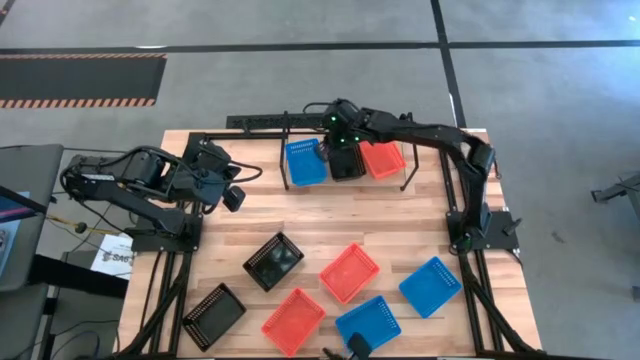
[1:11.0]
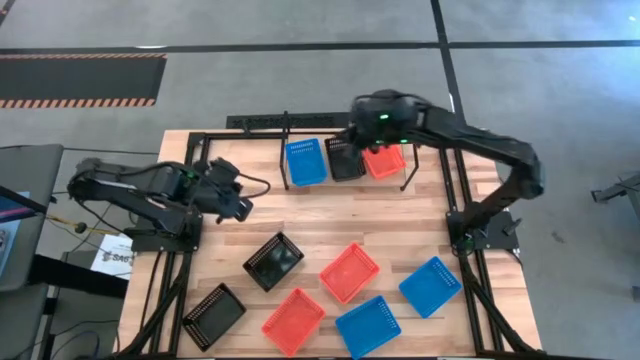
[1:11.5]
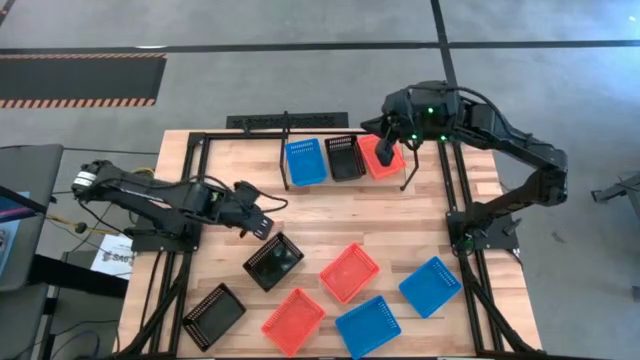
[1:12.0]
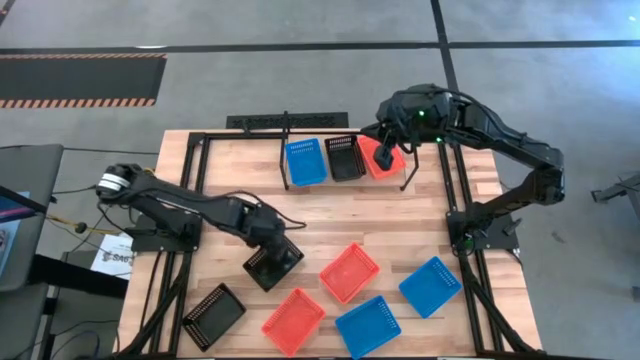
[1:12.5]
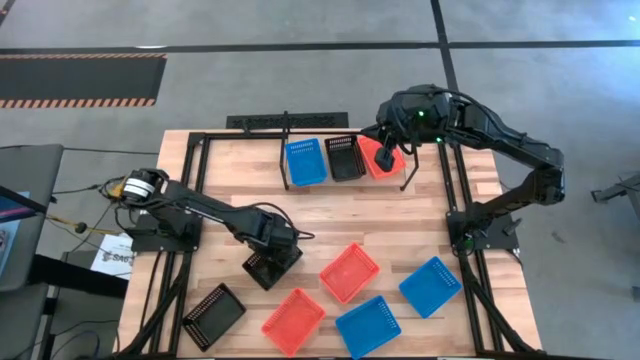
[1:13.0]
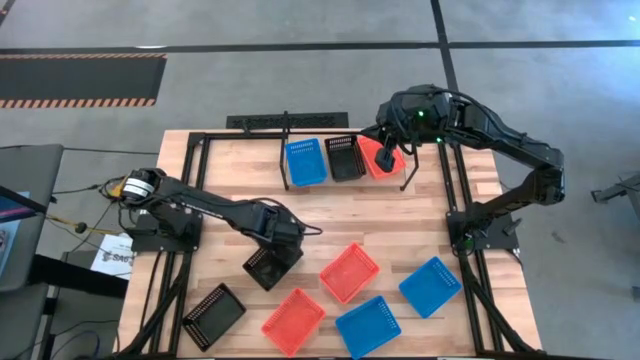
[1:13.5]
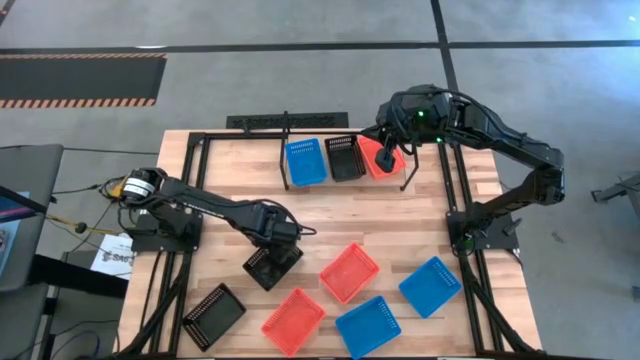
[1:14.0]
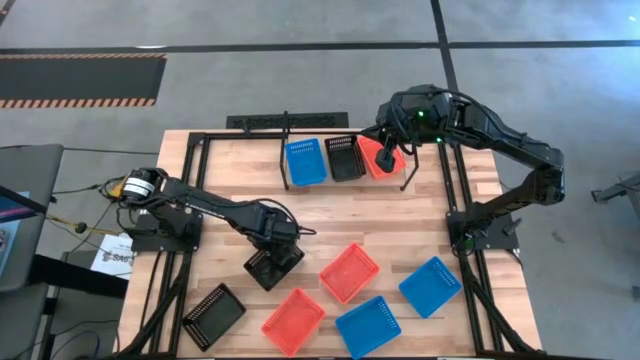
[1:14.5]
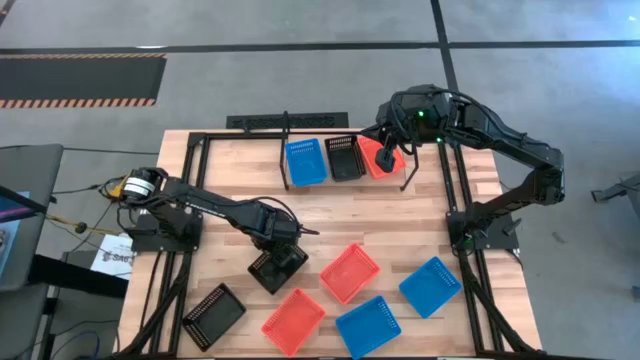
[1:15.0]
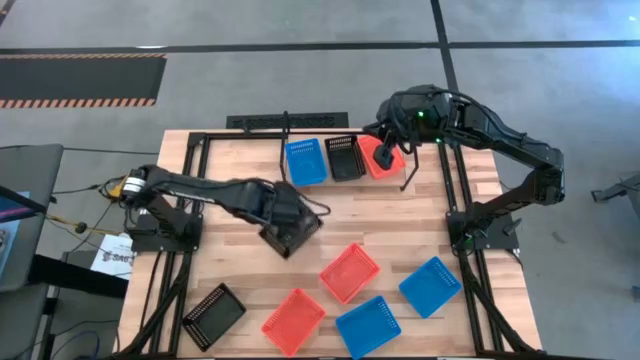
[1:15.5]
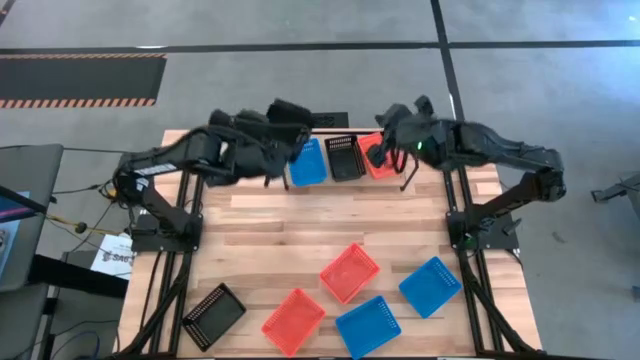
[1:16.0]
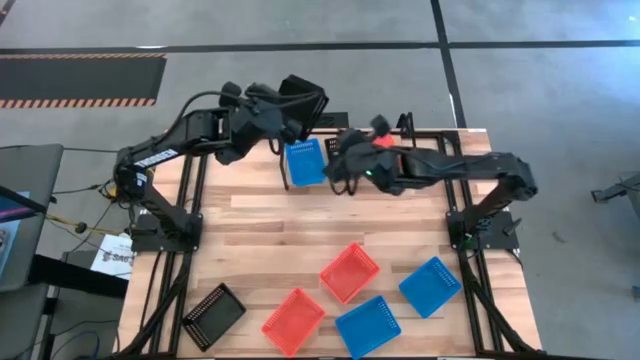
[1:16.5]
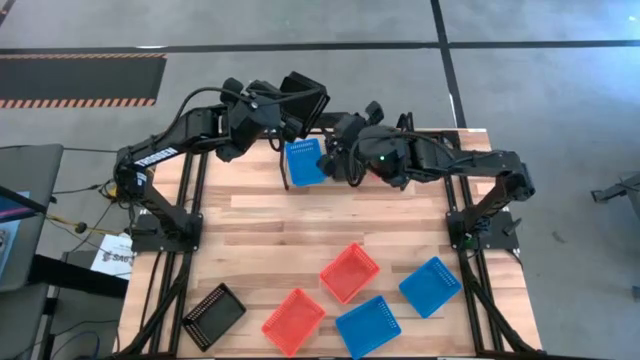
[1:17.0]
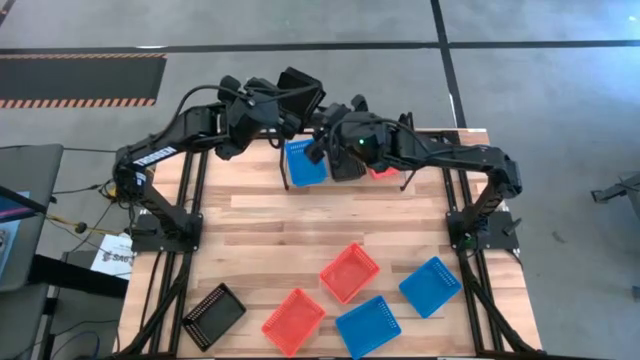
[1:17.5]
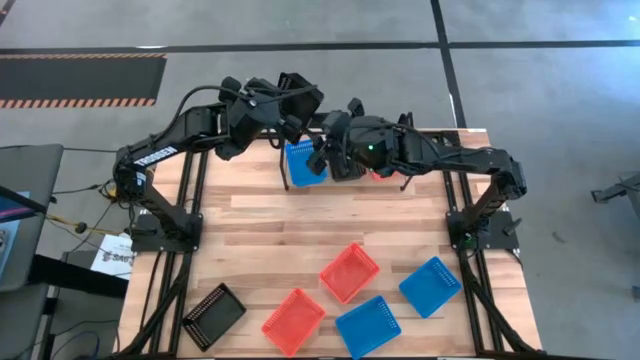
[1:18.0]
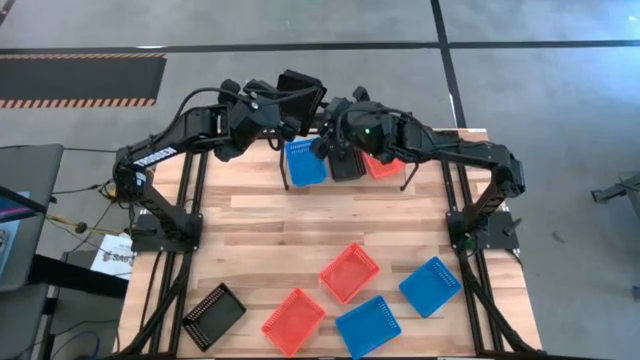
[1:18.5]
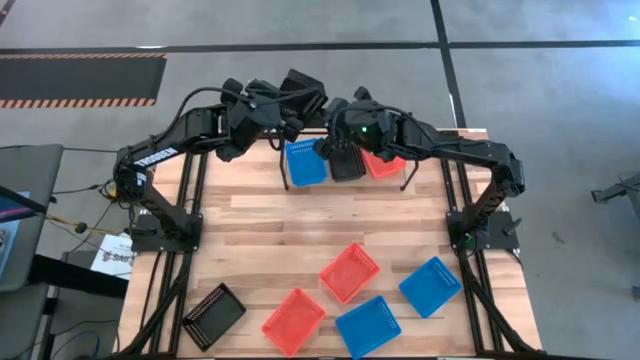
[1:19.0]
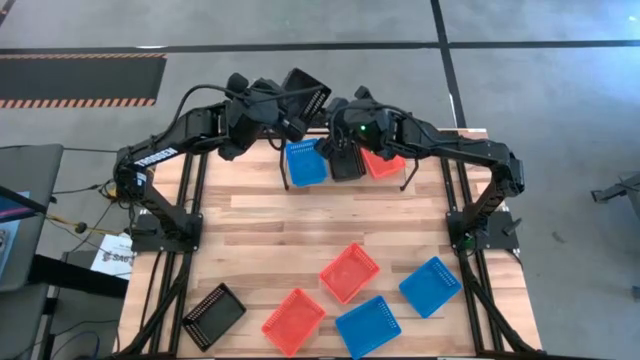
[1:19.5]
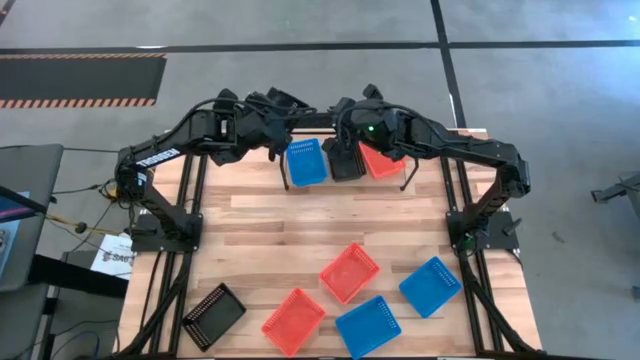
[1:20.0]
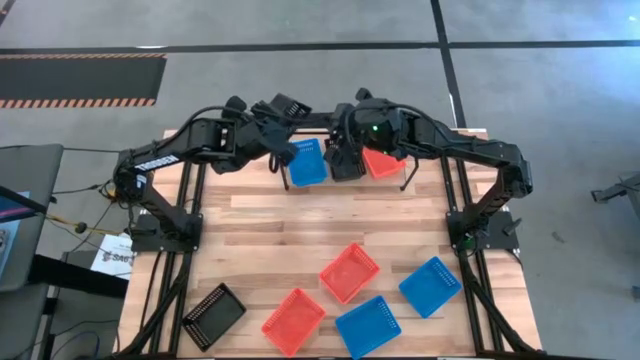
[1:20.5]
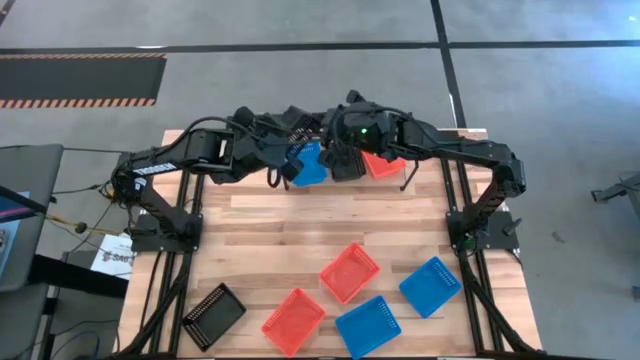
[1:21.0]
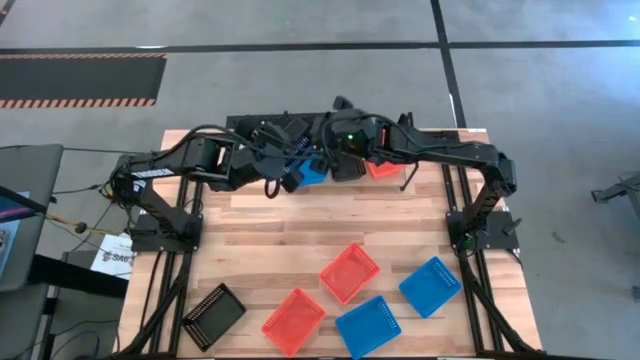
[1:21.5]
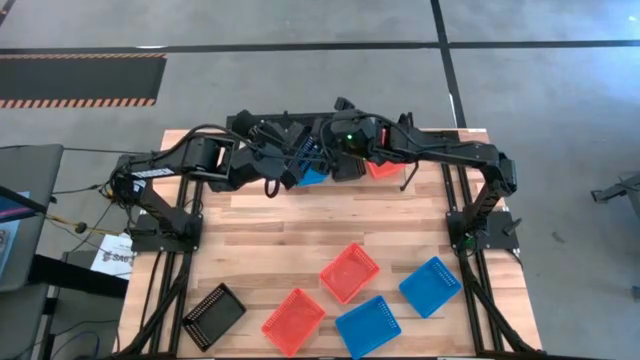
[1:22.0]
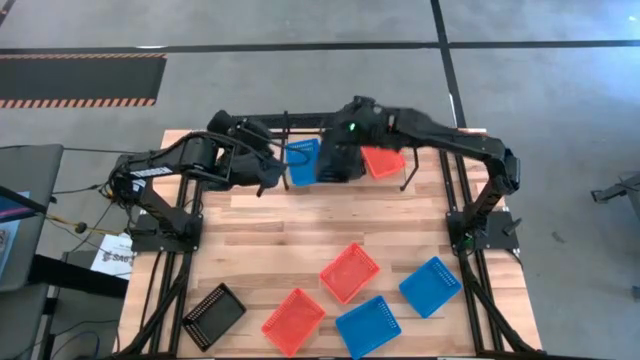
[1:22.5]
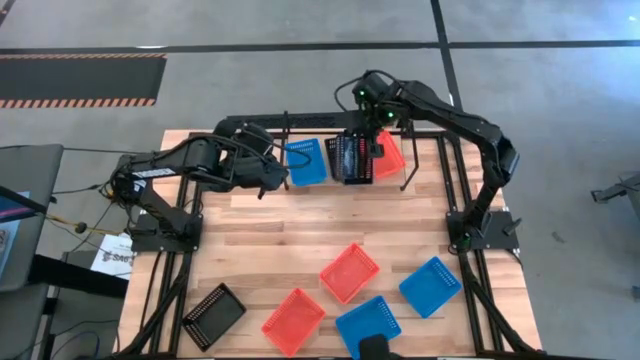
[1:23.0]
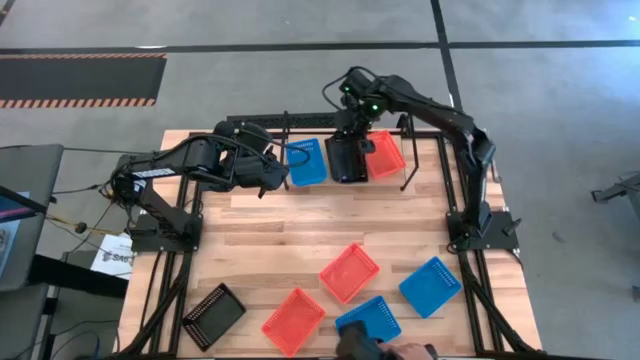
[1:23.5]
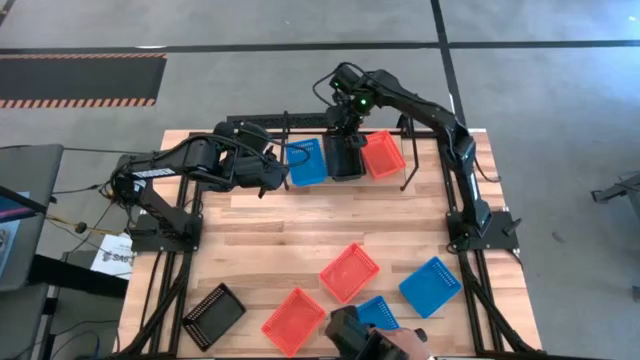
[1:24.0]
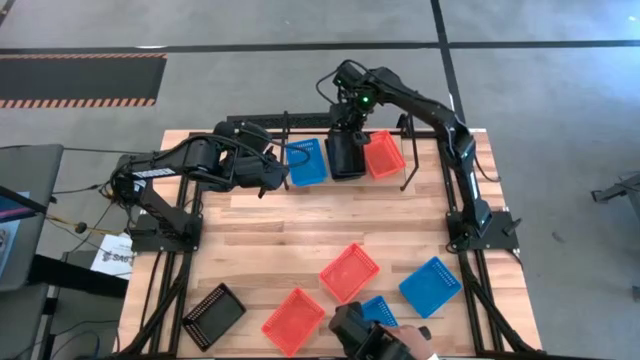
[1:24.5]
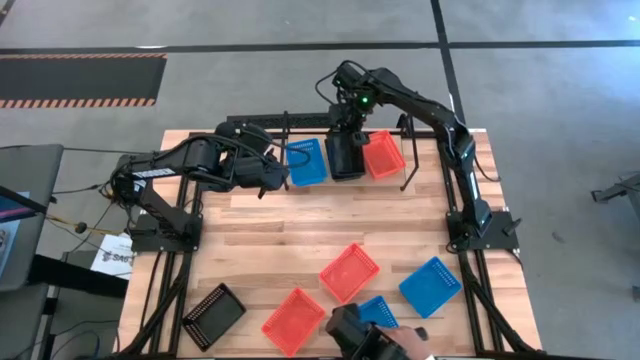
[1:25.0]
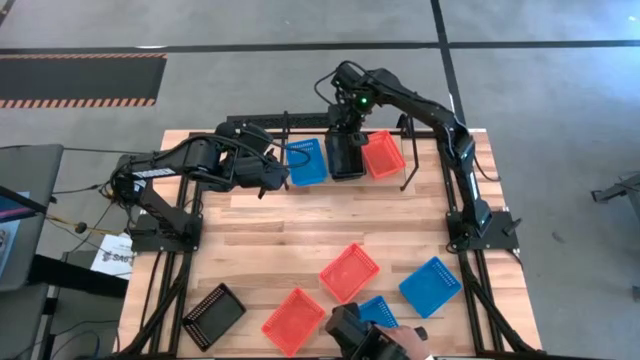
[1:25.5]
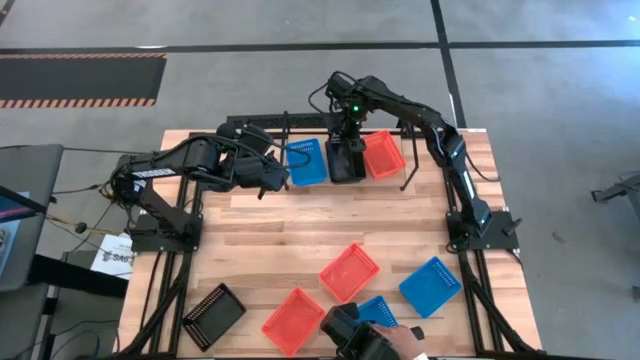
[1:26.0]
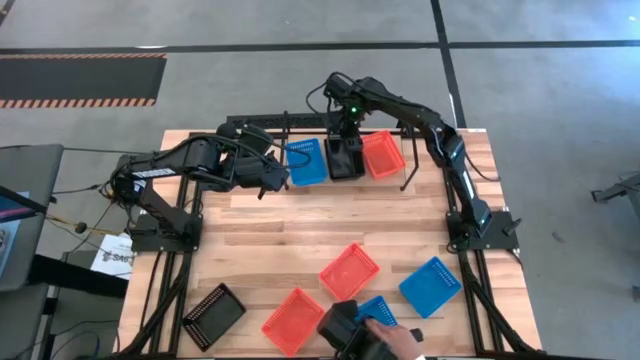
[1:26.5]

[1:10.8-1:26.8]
Task: Stack baskets on shelf by color
Stack the top black bin on top of the black bin on the shelf

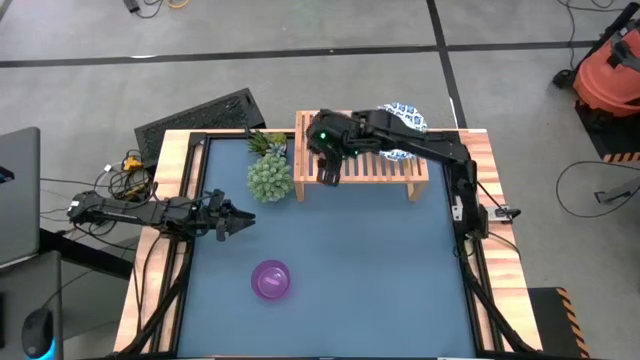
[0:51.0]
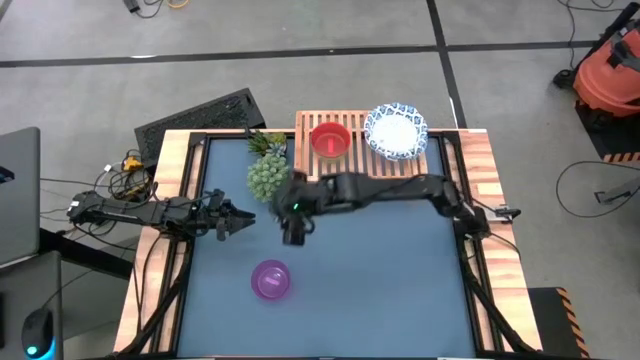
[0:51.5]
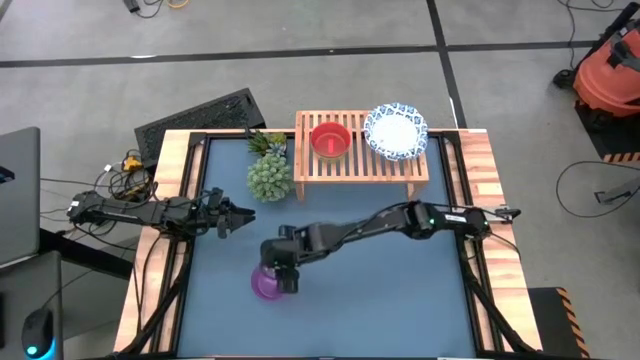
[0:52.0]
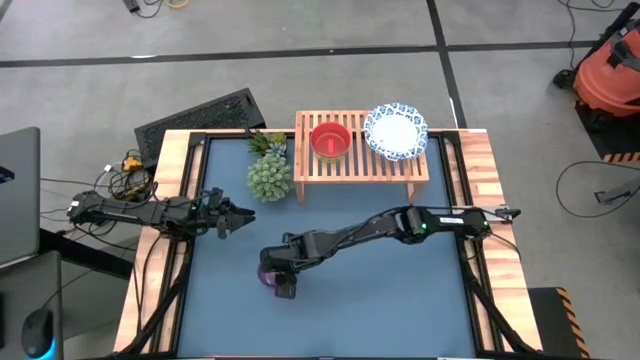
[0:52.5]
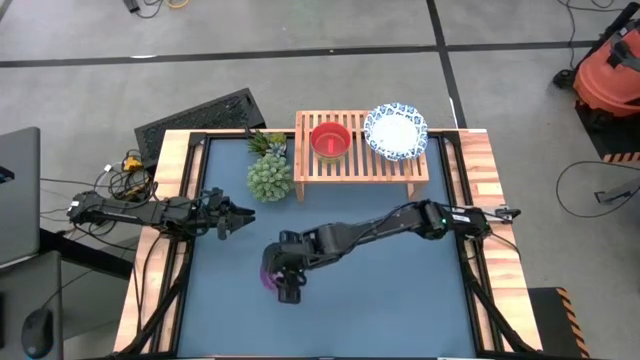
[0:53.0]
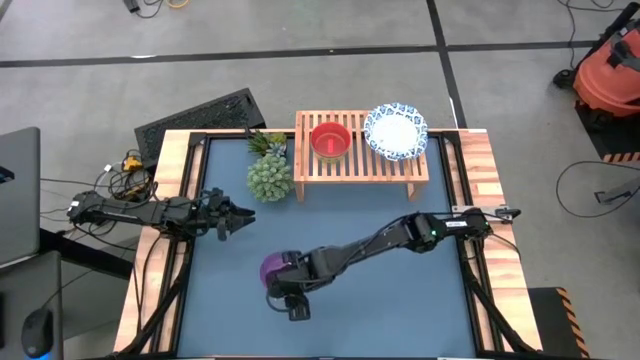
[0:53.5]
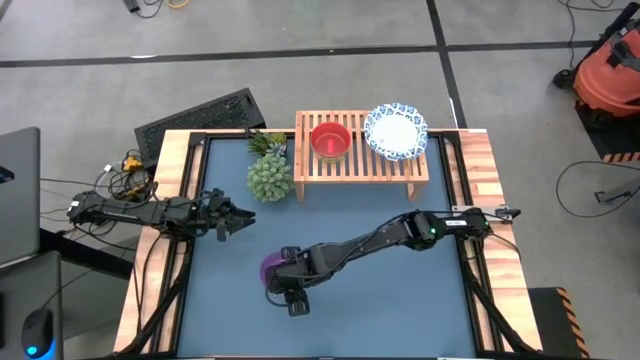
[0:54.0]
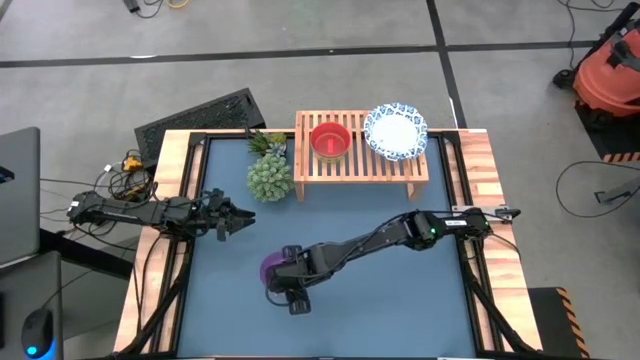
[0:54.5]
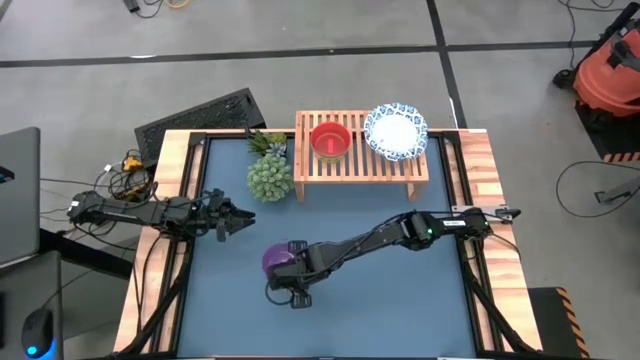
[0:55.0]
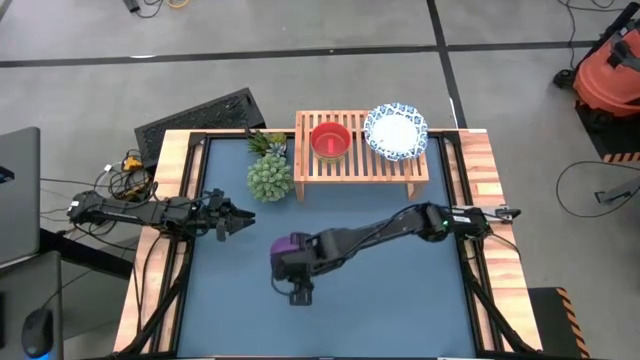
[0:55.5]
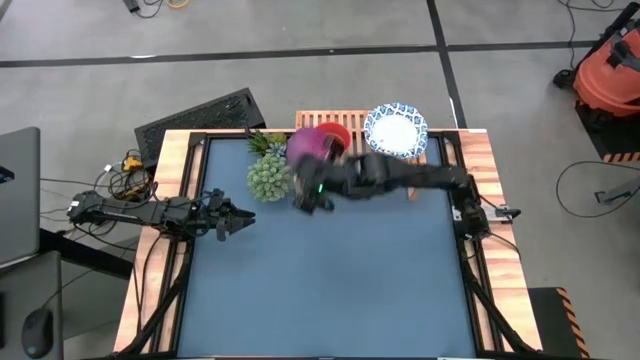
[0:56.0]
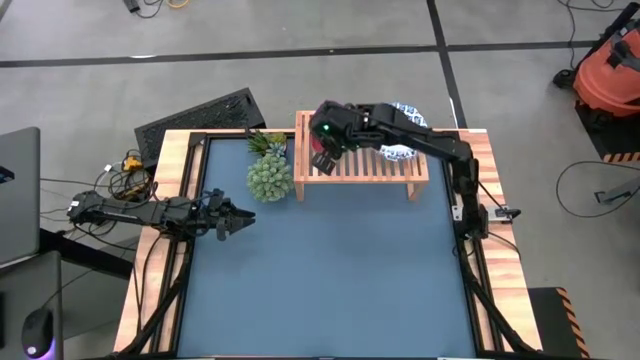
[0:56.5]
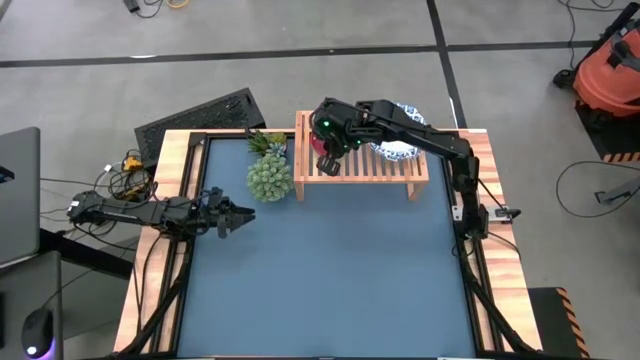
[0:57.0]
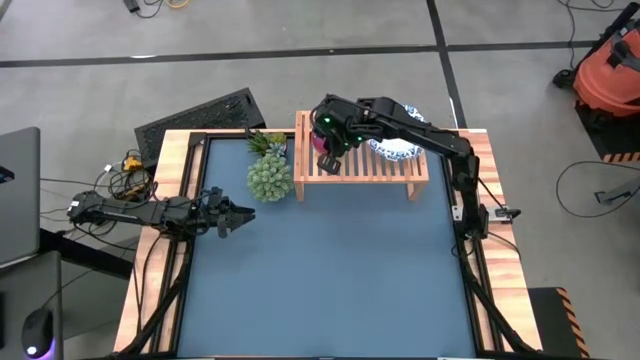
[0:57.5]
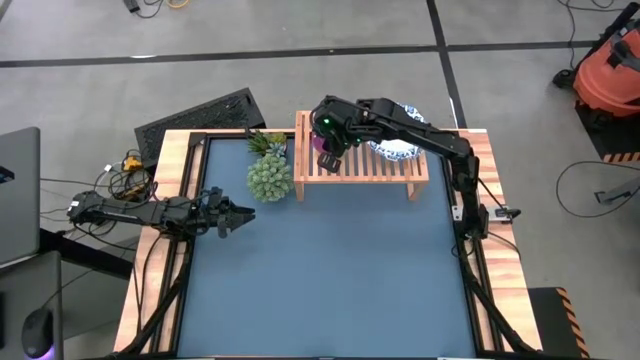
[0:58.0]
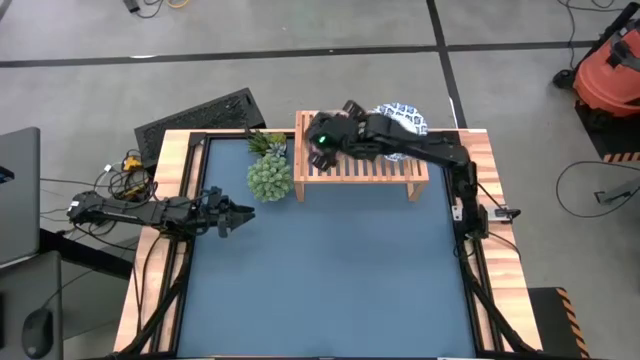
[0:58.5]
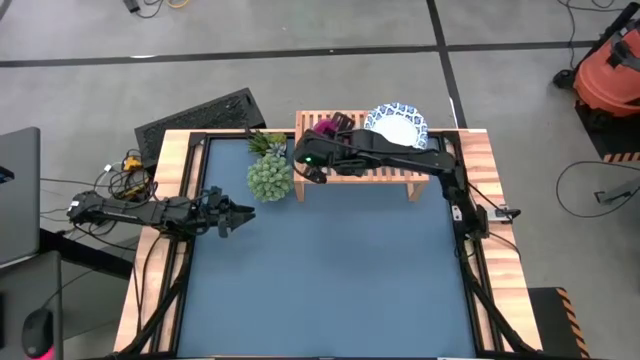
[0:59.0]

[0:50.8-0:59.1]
Task: Place and stack bowls onto a shelf
Stack the violet bowl on top of the orange bowl on the shelf
